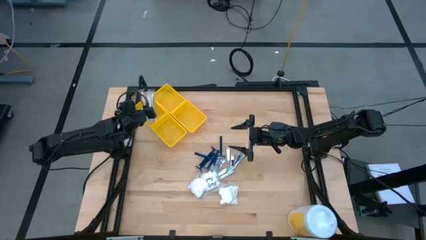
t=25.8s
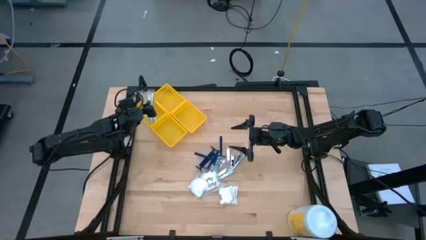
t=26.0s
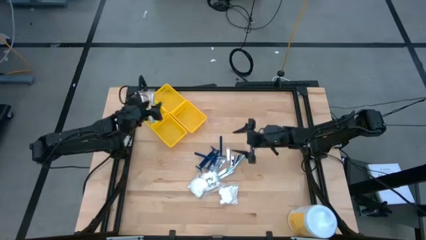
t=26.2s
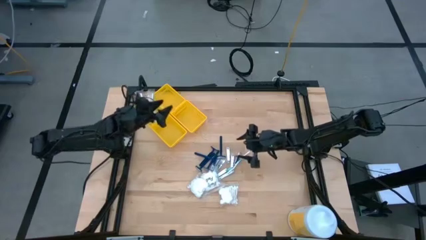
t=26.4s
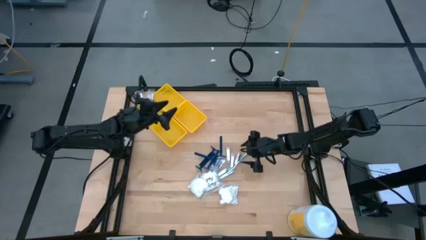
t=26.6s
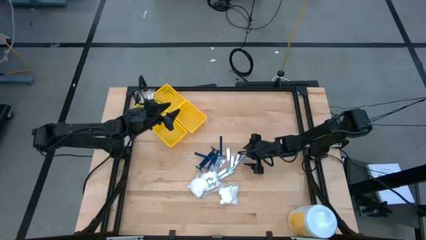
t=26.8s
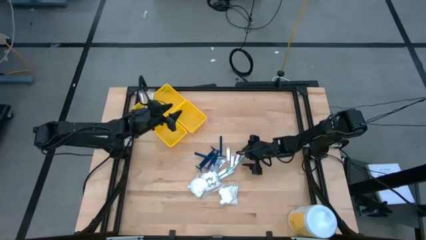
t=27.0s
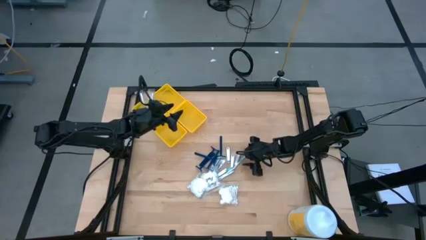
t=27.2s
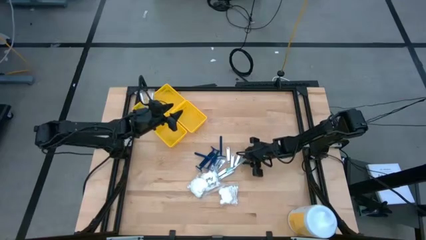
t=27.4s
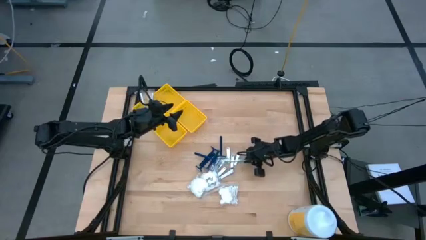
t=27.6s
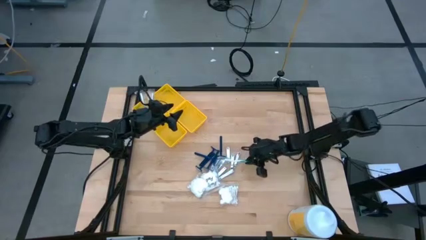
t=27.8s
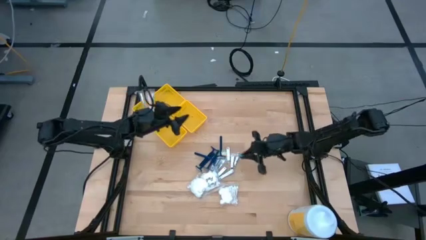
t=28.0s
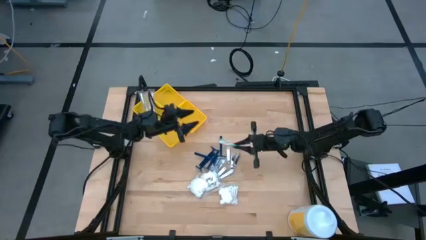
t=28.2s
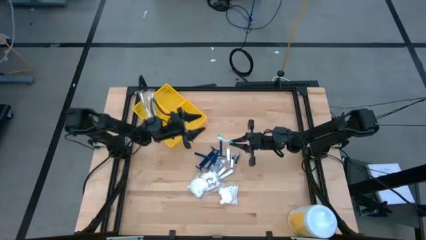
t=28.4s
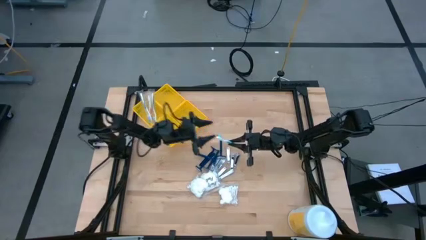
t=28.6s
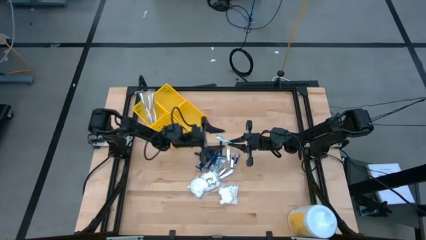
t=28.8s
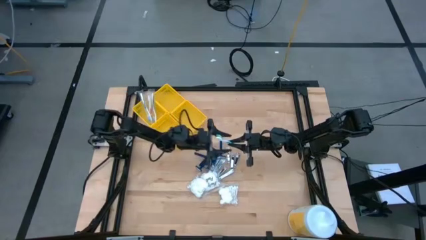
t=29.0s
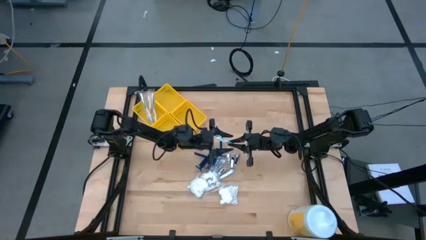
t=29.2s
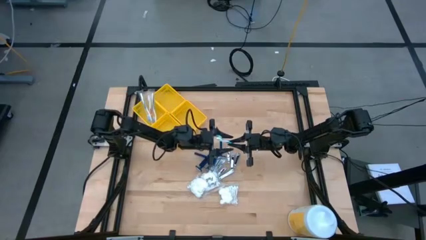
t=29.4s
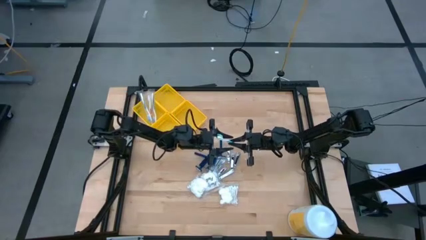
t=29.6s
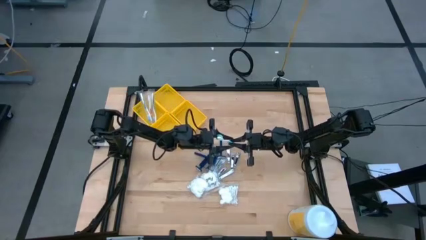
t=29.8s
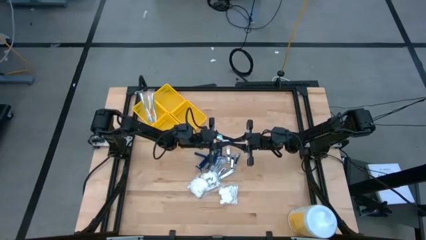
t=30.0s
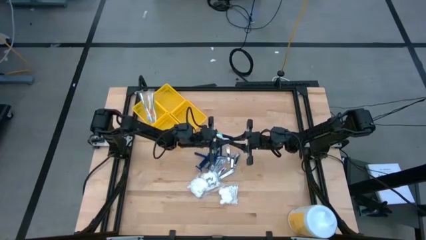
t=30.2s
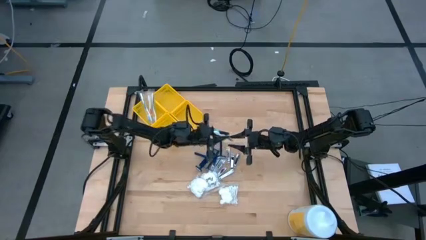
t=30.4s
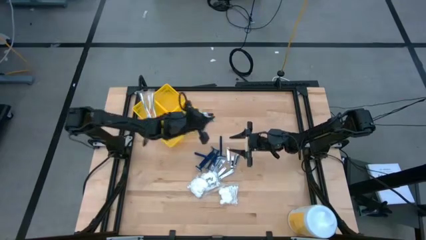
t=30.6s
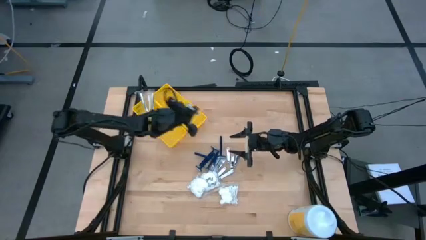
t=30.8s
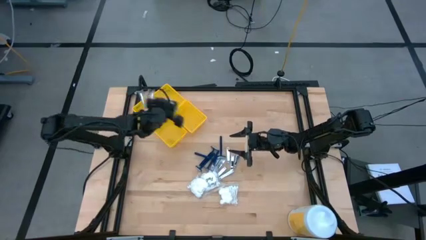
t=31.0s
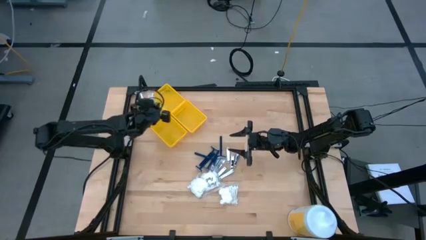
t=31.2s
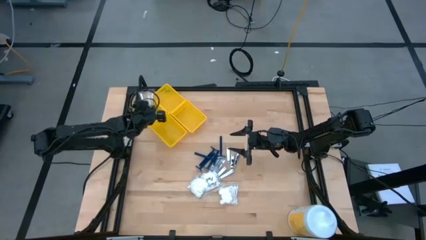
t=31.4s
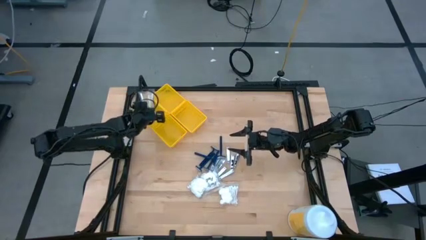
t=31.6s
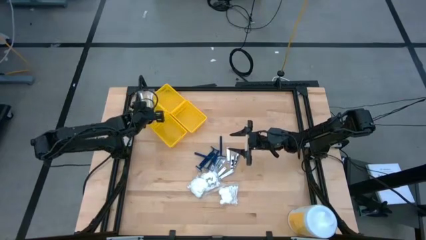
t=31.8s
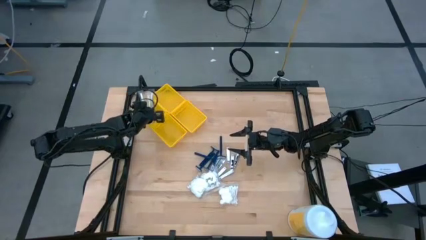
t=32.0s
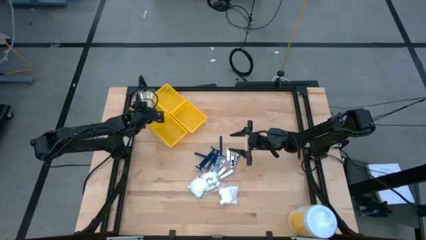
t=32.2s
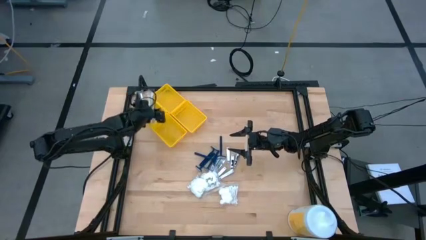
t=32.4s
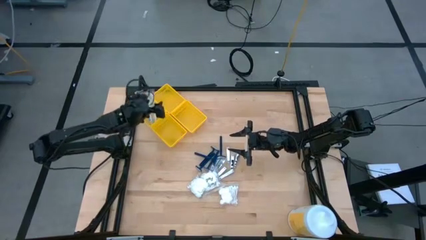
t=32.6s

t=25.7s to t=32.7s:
Task: Pick & Place Travel size toiletries
Put the green toothbrush into the middle left yellow bin

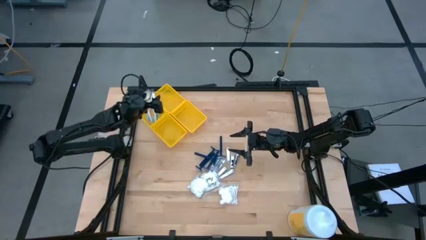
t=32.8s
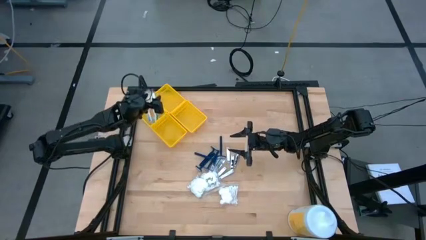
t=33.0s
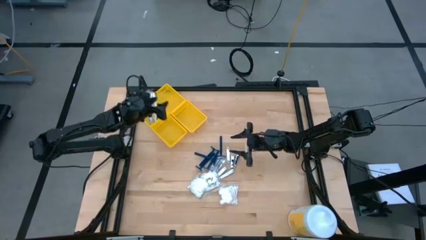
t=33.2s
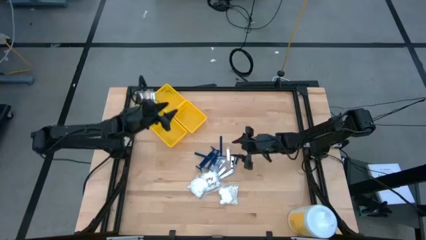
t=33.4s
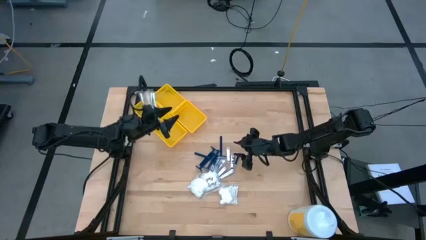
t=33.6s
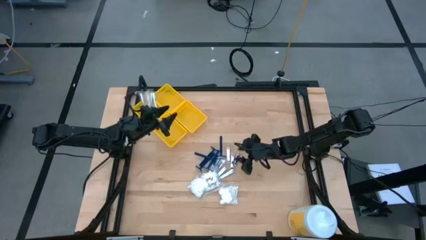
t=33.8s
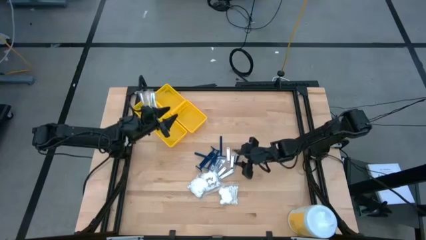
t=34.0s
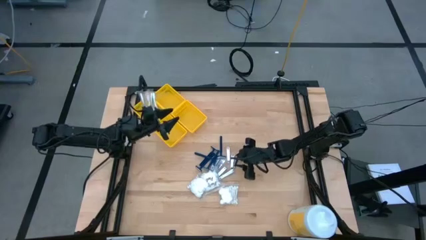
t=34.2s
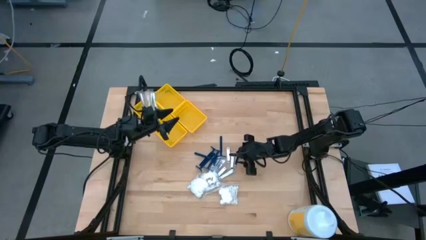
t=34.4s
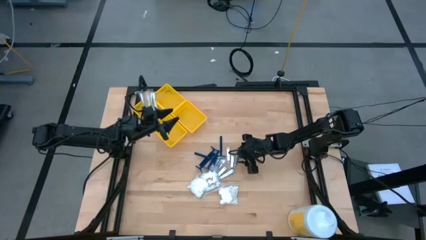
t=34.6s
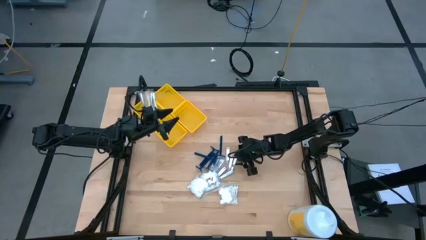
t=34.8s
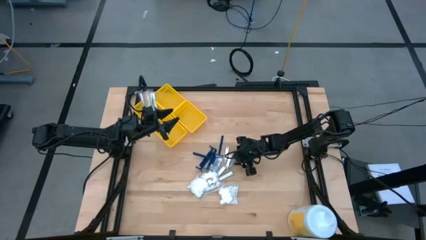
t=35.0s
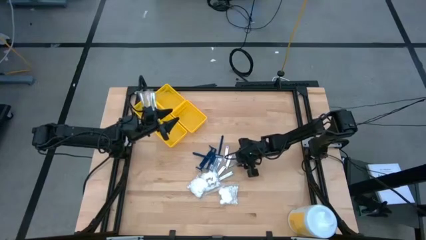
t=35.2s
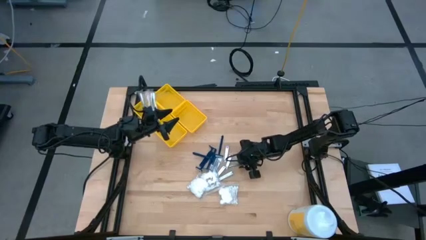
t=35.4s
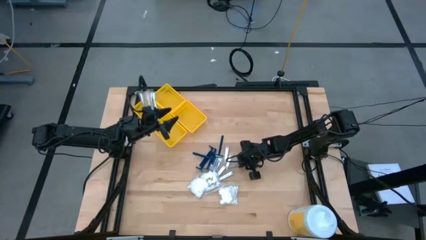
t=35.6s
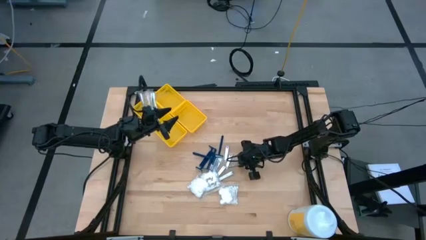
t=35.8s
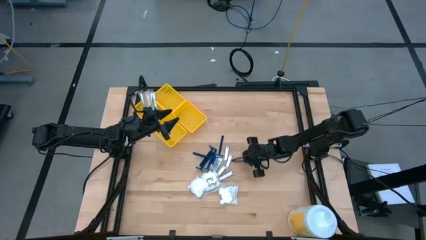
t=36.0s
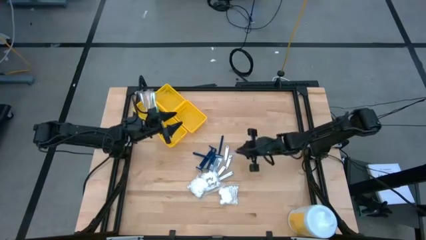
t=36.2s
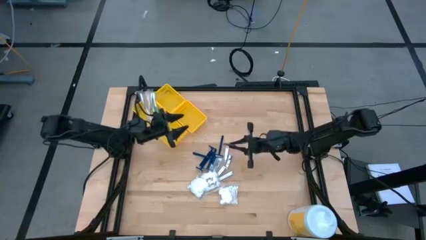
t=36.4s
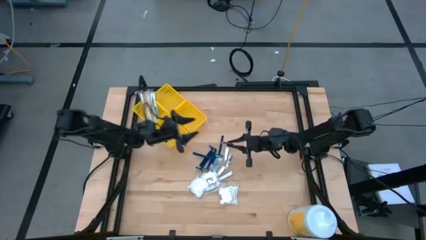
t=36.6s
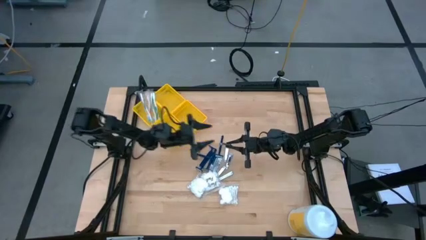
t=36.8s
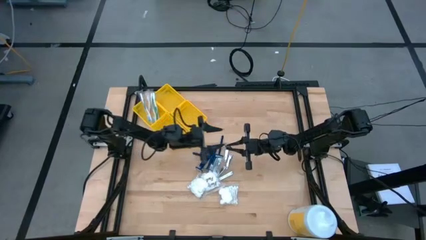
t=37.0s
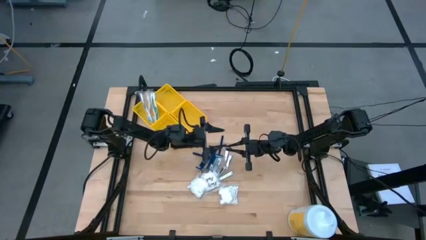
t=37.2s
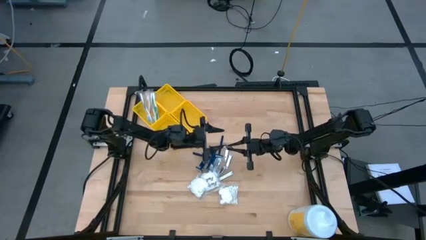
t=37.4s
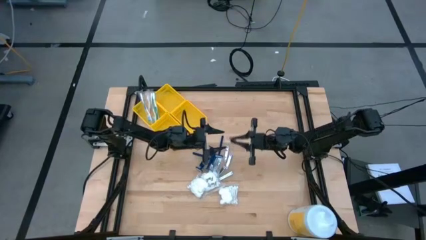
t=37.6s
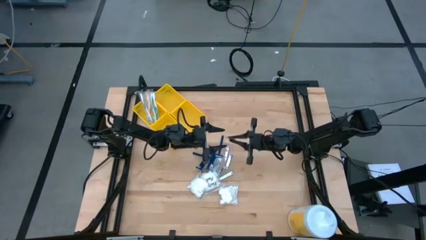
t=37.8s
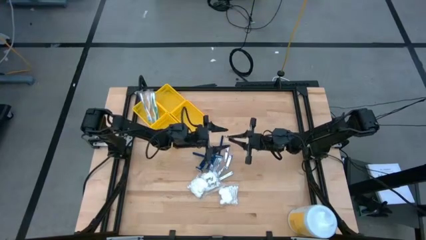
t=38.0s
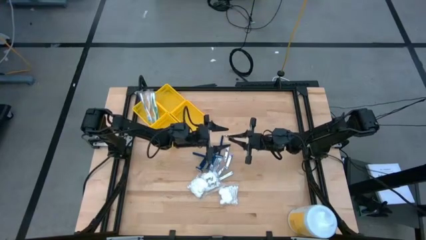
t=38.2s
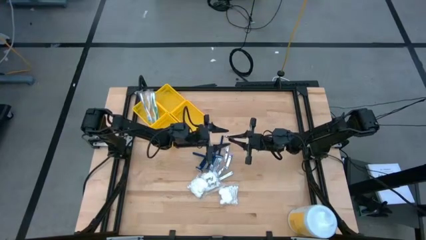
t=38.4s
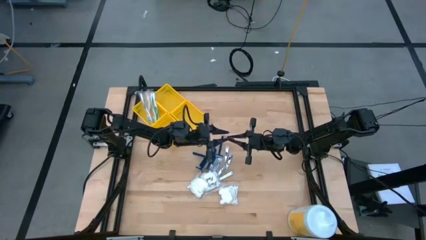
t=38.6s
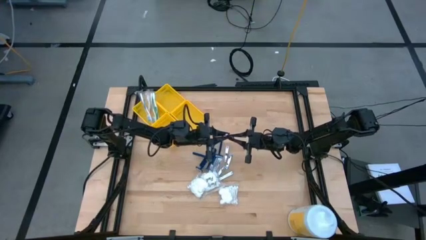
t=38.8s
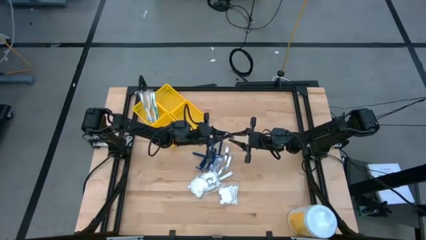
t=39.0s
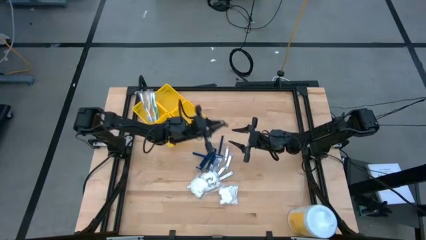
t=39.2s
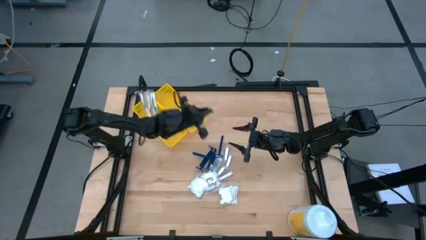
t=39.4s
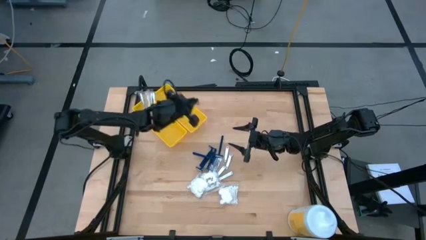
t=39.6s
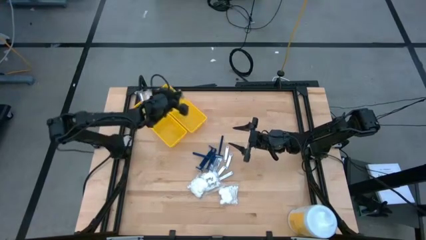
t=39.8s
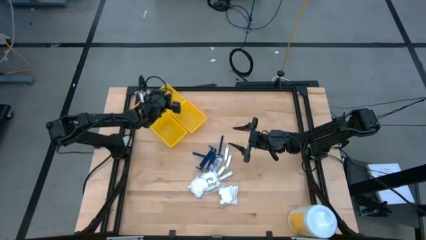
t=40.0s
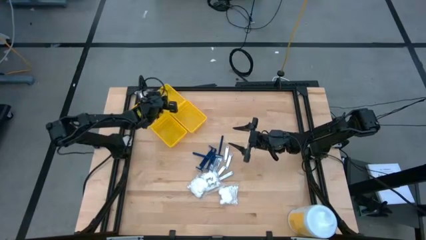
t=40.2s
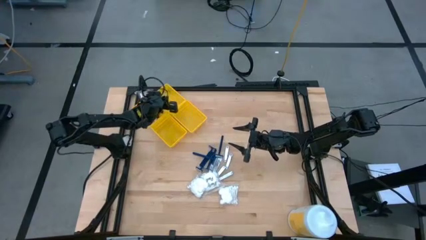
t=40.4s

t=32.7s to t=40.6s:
Put the silver nail cutter into the top yellow bin

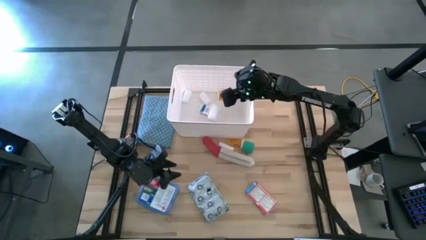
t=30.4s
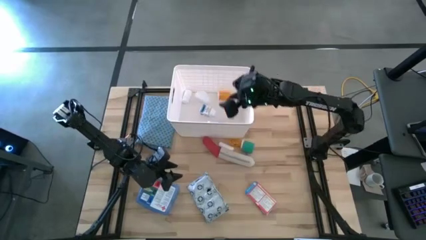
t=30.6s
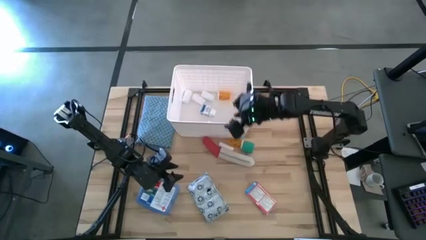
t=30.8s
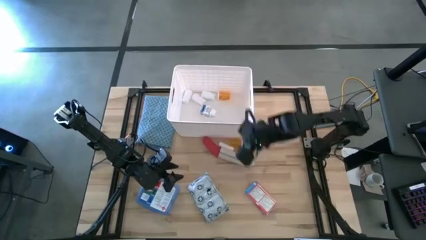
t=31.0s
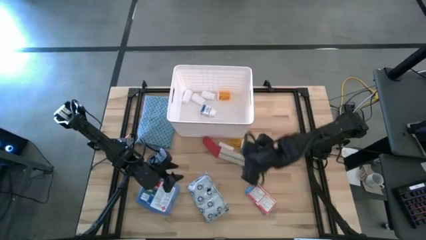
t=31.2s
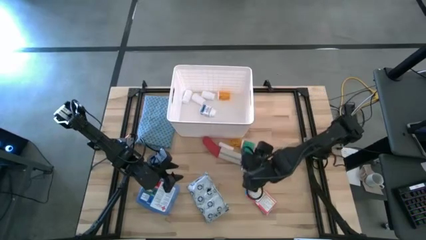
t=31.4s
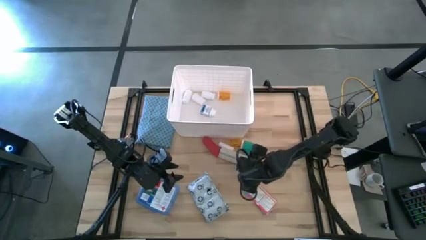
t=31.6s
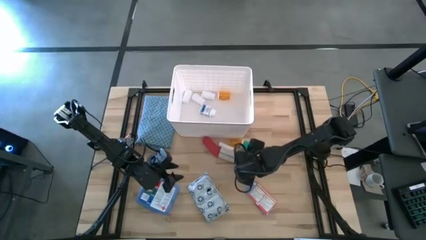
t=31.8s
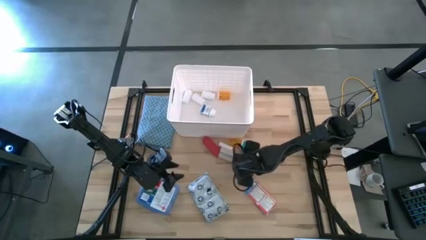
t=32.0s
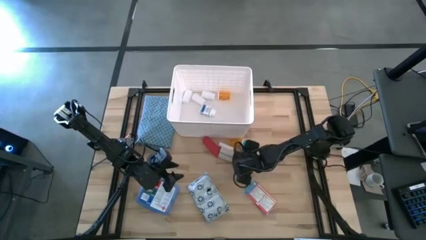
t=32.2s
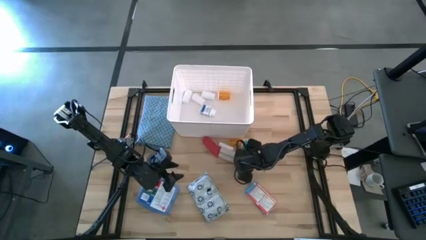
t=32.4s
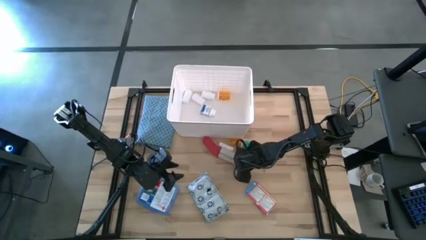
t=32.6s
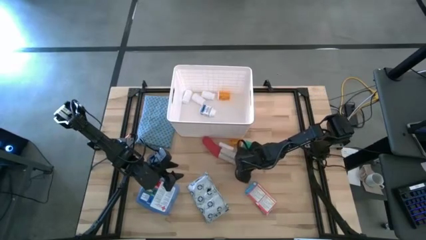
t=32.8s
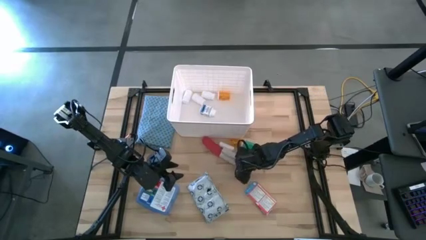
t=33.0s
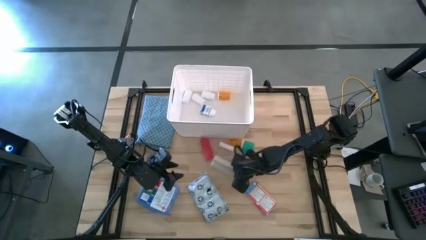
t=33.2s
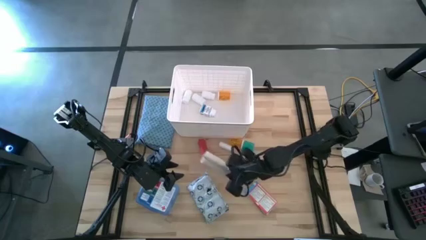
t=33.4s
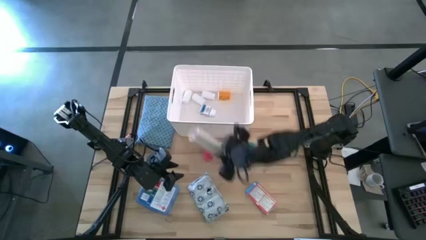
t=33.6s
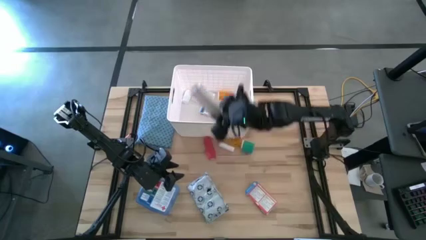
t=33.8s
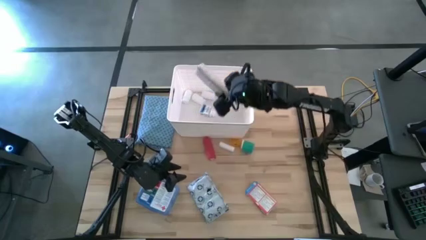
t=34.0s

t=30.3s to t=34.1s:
Task: Pick & place medical supplies in basket/bin
Put the white rolled bandage in the white bin
